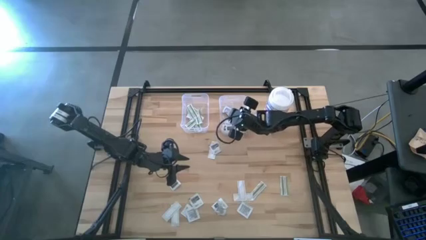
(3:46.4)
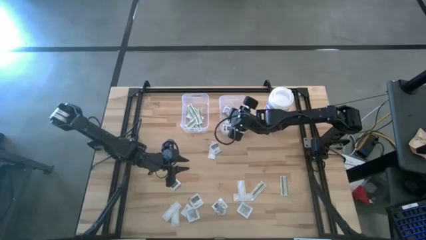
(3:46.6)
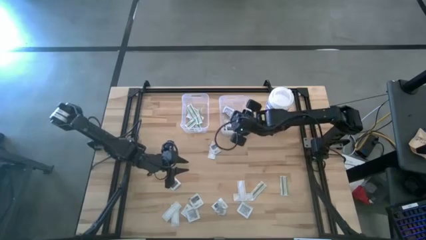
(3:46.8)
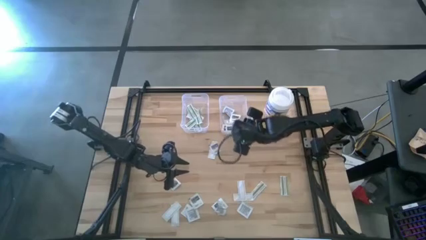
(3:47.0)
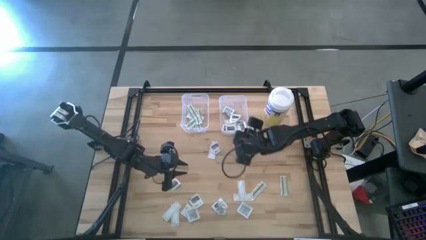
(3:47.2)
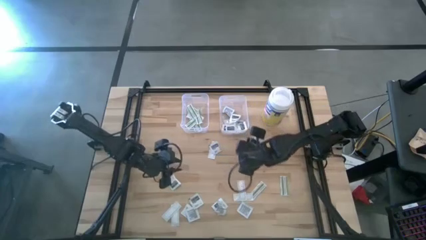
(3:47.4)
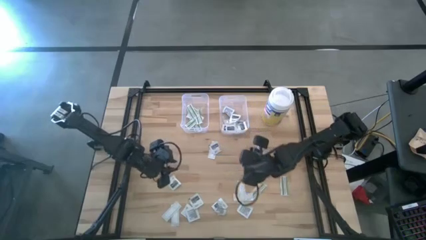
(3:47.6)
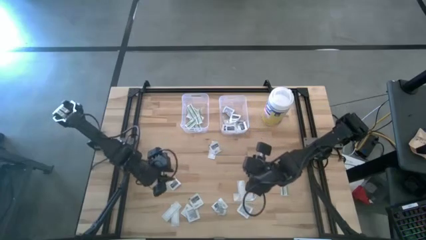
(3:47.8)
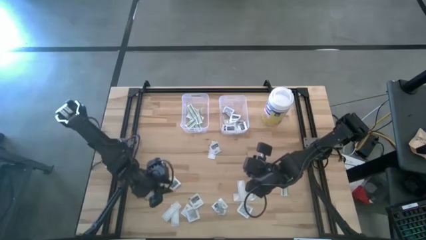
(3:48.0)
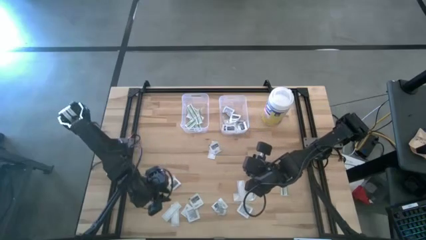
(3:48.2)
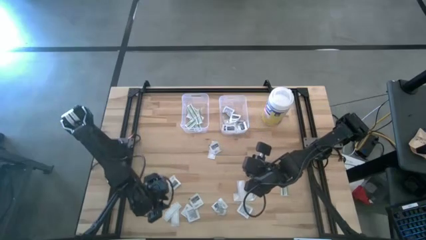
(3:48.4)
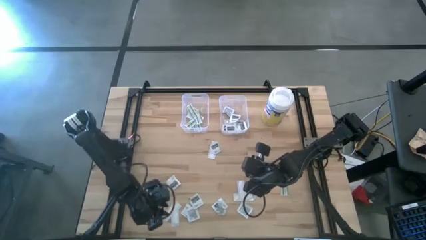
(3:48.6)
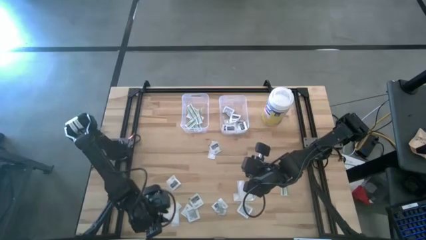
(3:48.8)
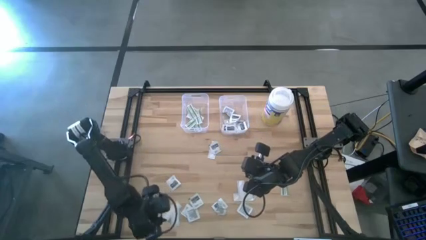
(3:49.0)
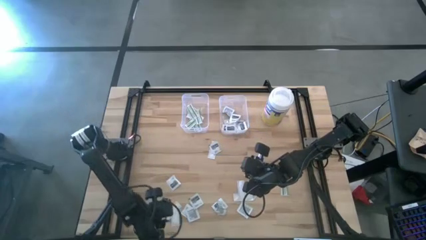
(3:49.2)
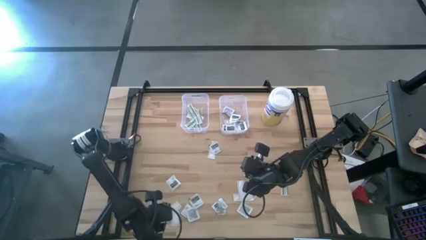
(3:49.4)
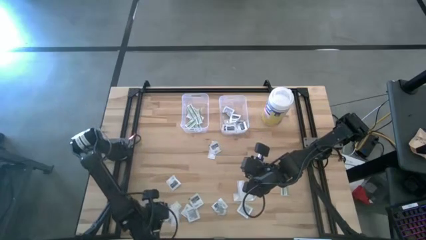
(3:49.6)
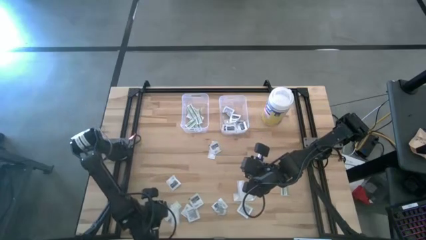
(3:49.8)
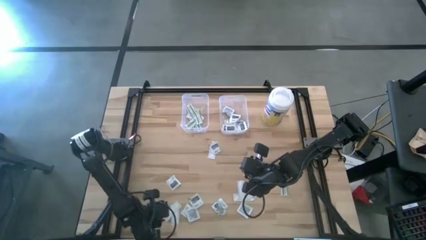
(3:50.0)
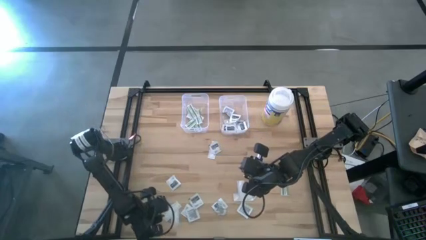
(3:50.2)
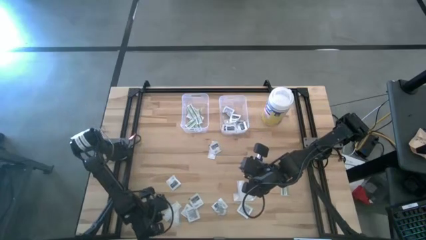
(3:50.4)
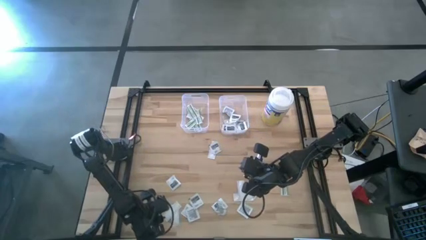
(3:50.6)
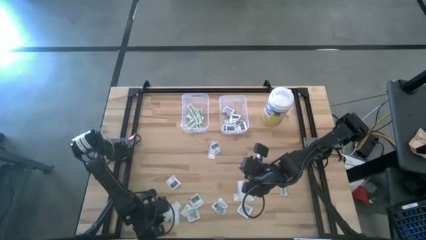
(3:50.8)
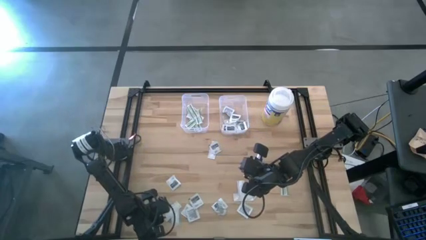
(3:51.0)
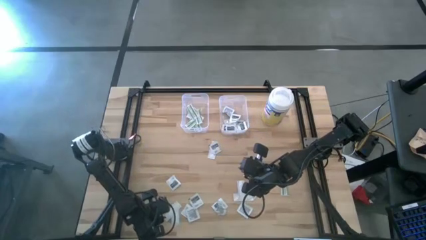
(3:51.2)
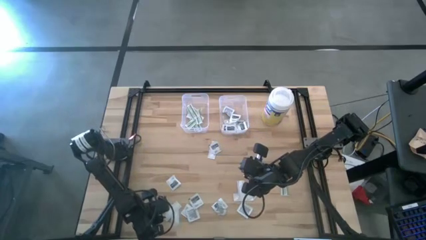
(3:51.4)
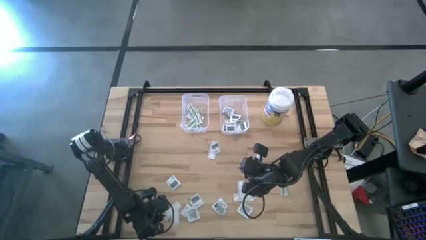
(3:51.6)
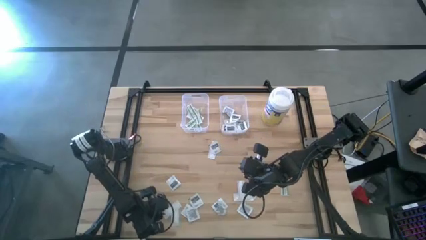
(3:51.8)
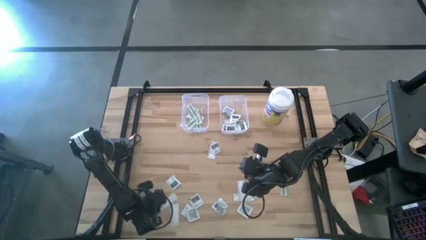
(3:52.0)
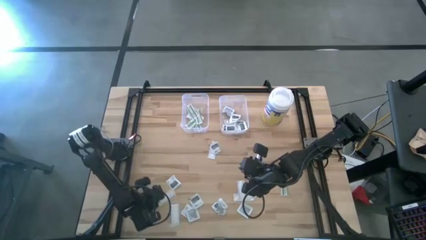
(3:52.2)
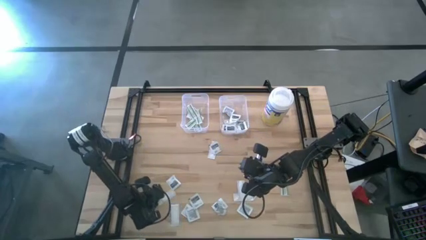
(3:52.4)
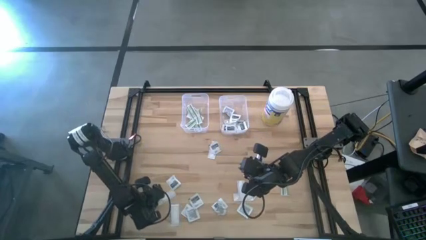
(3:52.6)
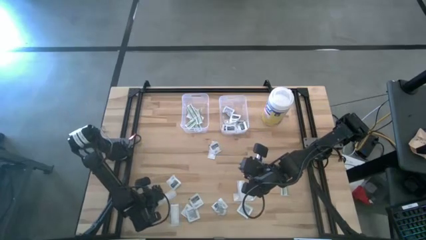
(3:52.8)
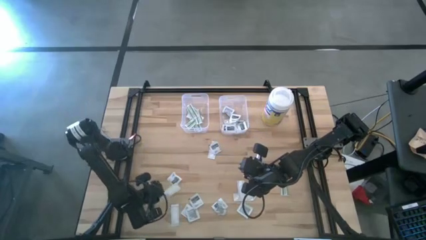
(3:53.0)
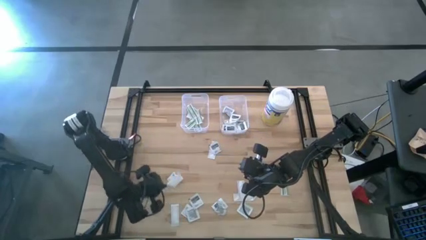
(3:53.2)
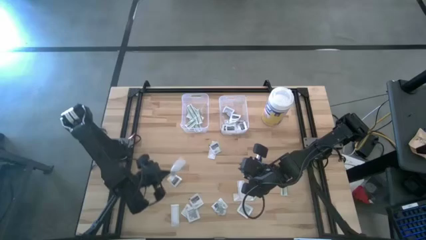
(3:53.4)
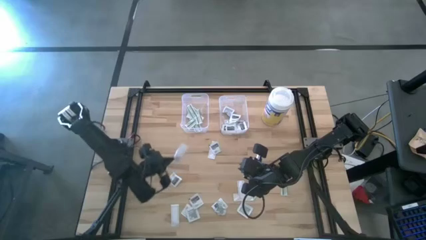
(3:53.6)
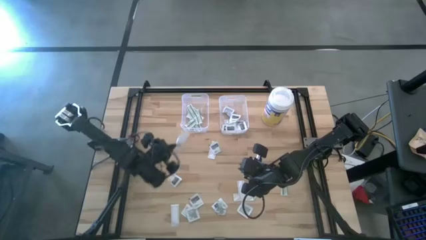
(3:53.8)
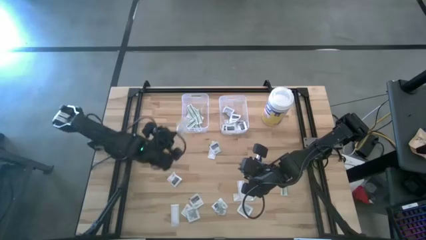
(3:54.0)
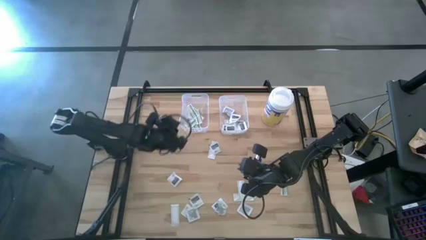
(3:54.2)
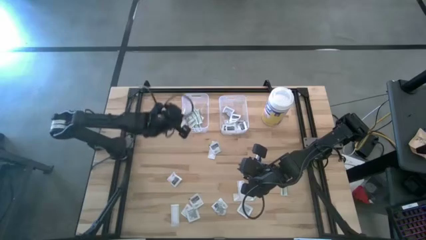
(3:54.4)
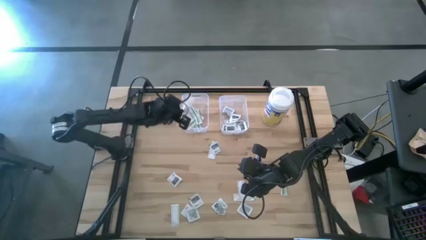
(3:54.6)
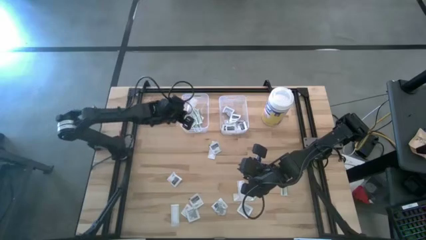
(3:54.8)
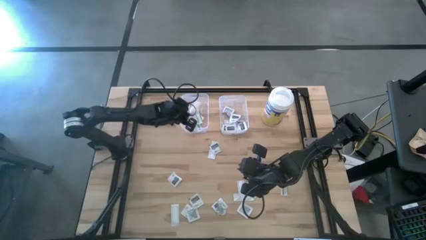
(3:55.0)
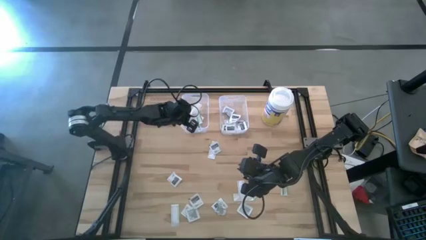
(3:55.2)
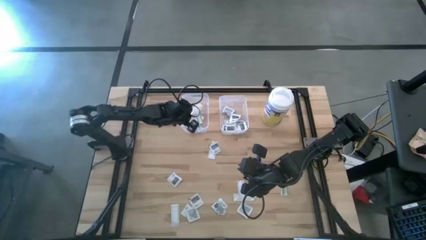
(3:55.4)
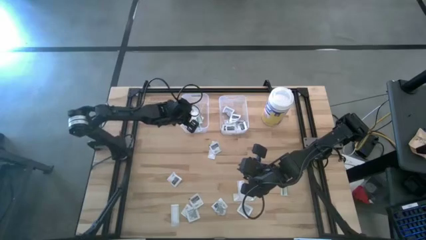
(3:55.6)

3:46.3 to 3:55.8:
Task: Pick & Place First Aid Supplies
Put the green bandage pack into the left transparent bin

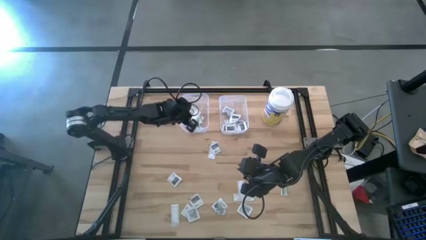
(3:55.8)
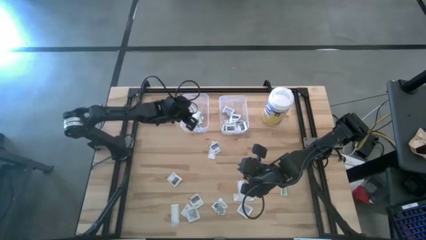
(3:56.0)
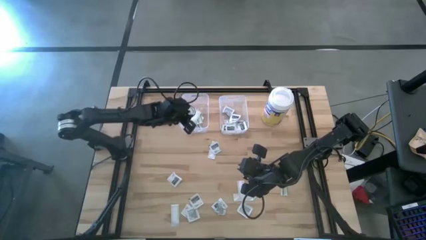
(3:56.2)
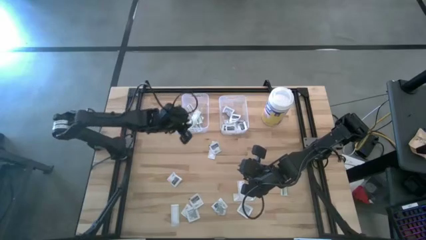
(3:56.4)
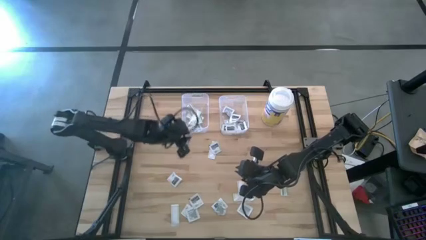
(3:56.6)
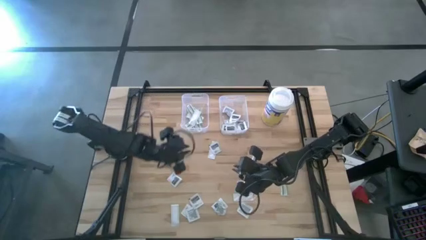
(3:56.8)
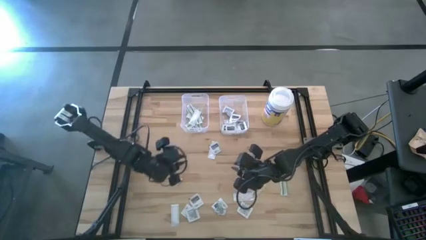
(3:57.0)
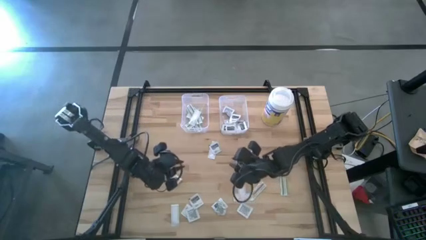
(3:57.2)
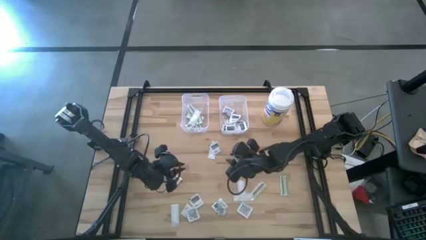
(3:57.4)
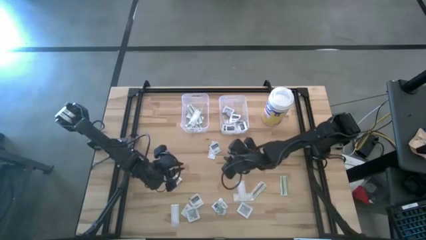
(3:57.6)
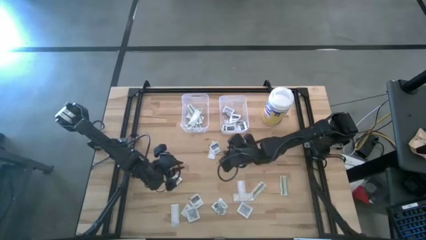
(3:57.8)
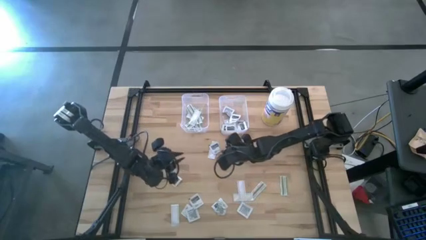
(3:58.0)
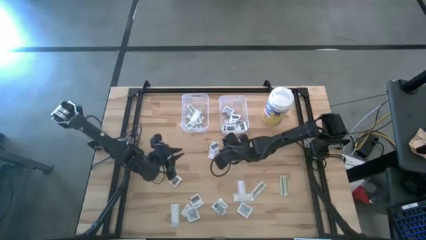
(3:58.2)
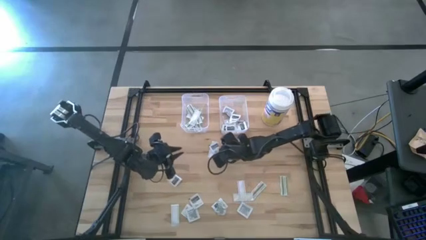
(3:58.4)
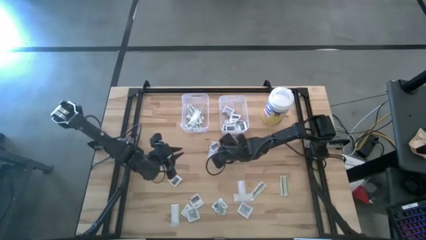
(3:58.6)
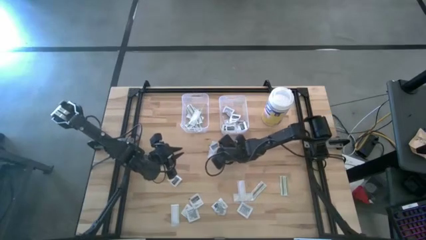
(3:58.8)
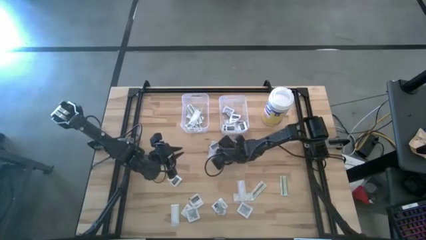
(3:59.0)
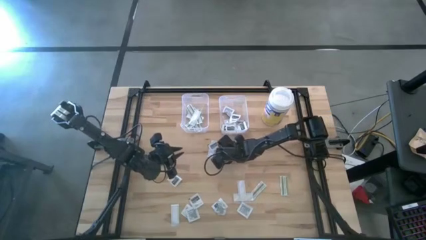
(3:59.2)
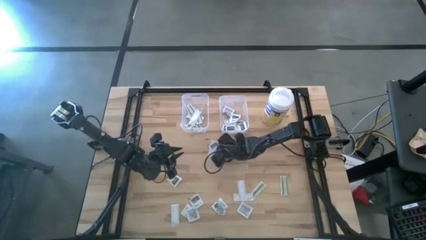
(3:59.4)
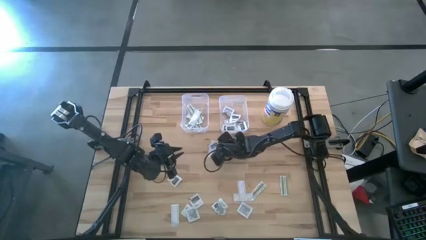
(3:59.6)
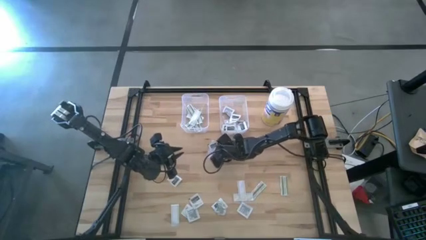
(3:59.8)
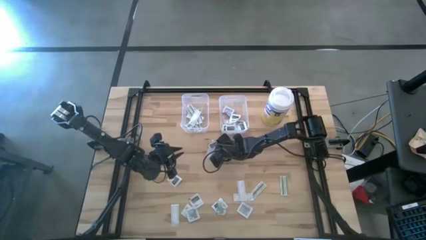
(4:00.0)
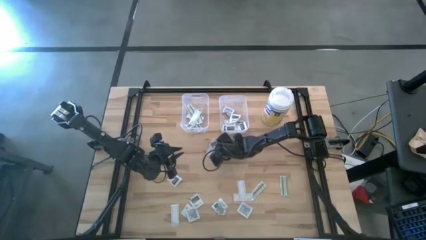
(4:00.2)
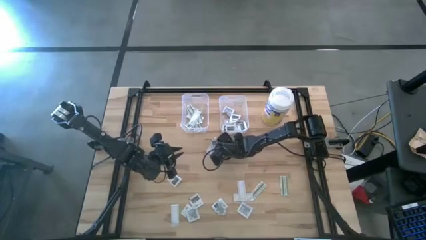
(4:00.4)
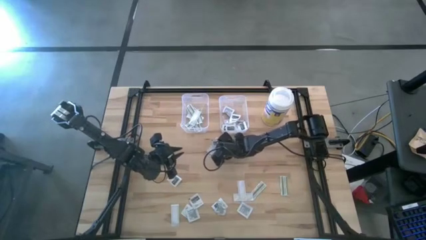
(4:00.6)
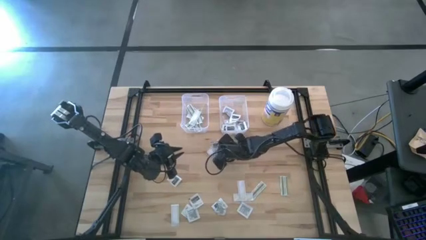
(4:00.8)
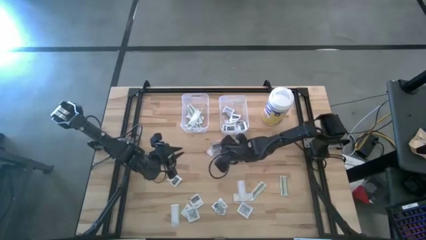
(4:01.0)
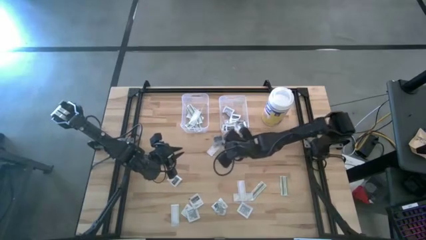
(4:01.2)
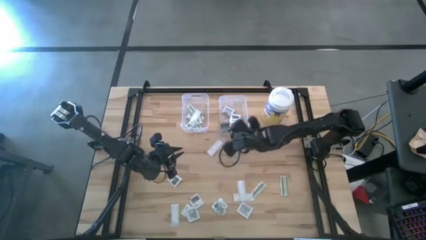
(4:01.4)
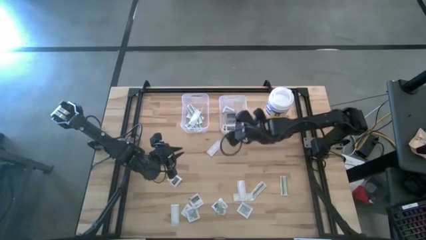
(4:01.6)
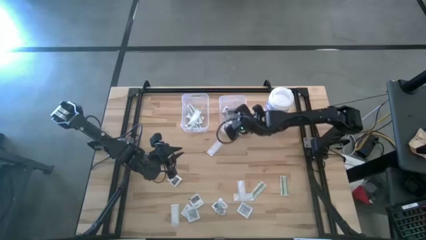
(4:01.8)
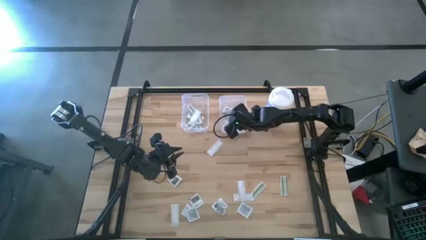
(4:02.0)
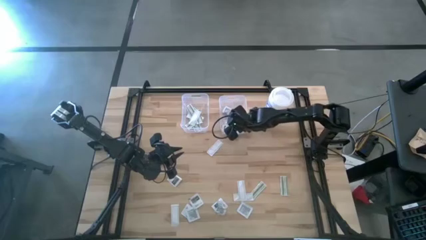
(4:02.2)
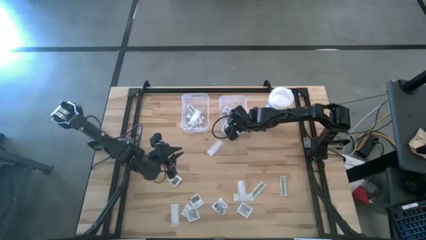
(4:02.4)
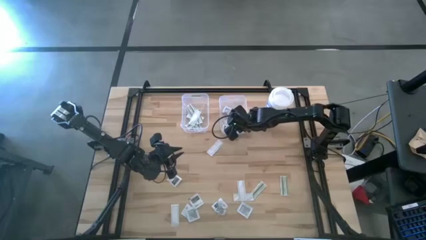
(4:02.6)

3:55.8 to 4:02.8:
Put the gray towelette pack into the right transparent bin
